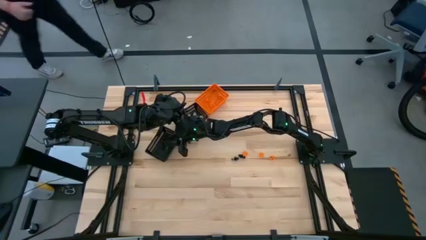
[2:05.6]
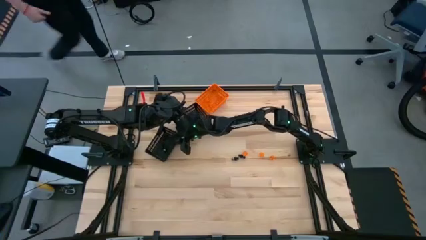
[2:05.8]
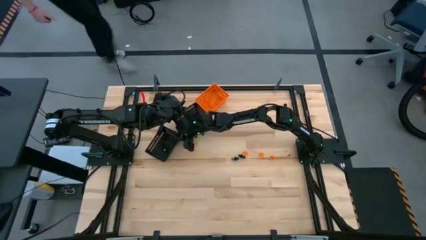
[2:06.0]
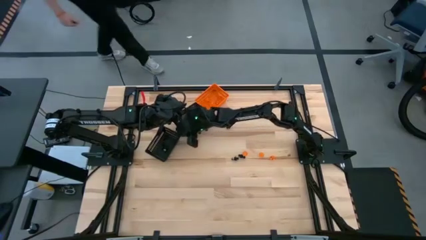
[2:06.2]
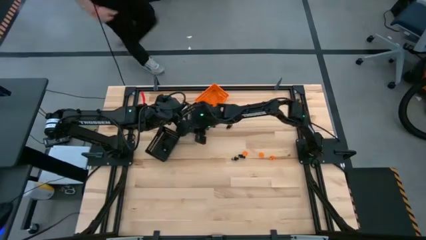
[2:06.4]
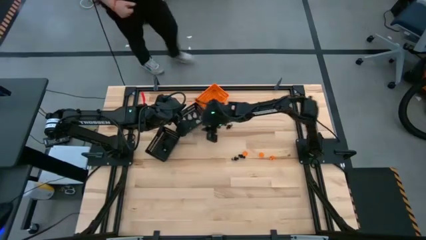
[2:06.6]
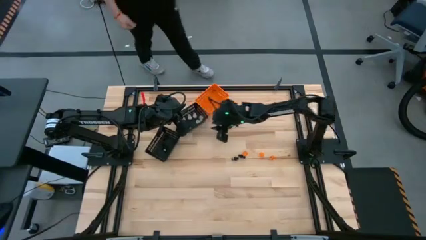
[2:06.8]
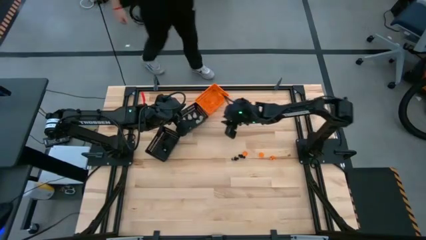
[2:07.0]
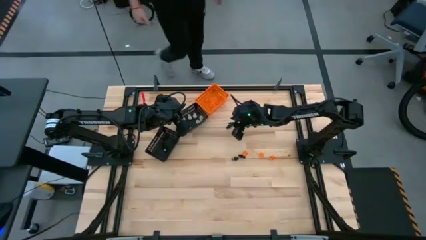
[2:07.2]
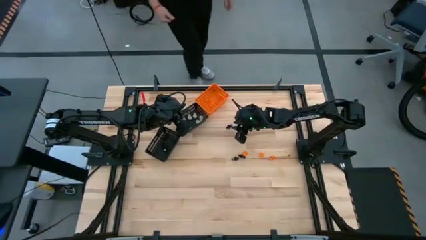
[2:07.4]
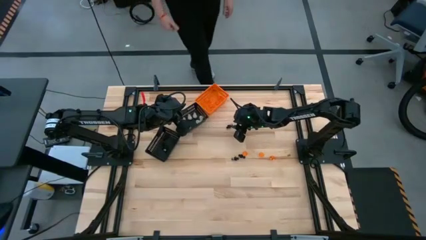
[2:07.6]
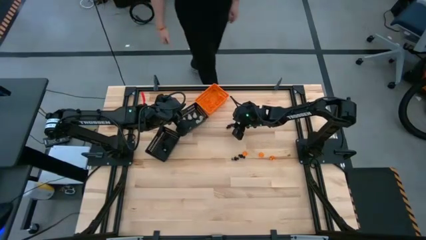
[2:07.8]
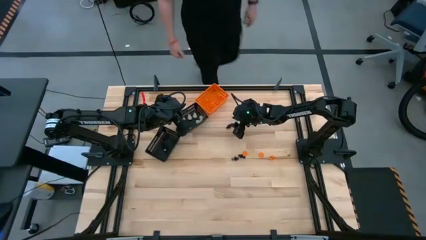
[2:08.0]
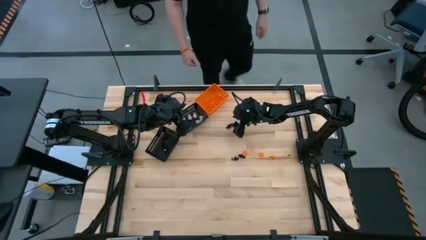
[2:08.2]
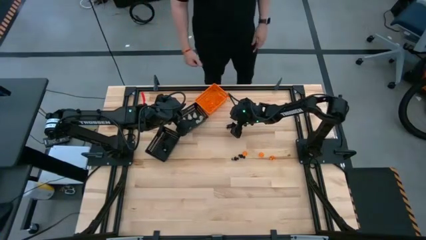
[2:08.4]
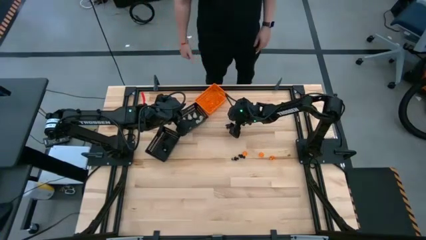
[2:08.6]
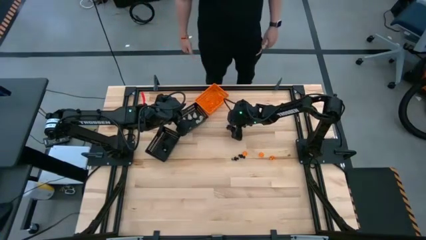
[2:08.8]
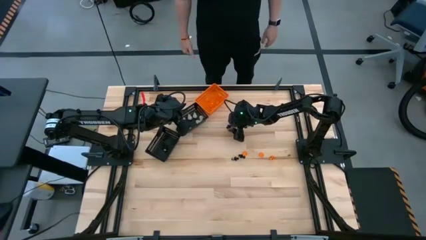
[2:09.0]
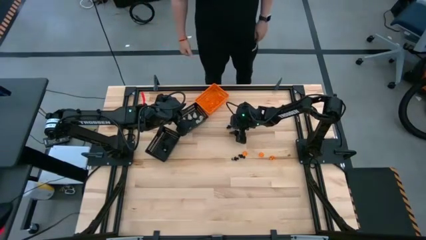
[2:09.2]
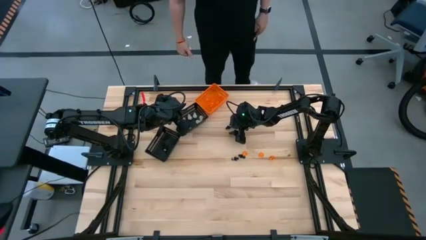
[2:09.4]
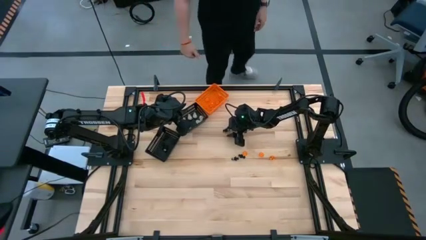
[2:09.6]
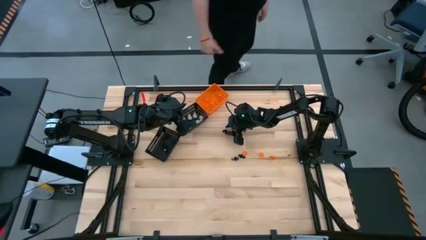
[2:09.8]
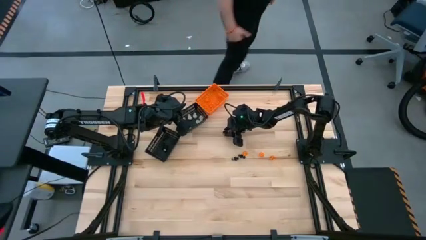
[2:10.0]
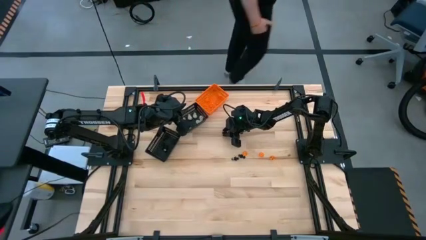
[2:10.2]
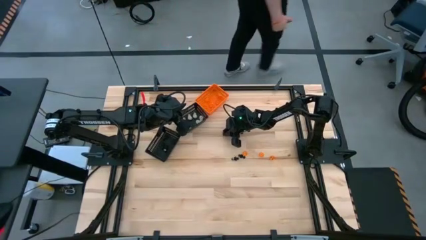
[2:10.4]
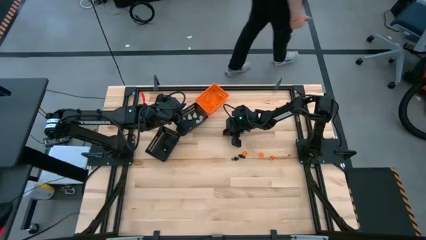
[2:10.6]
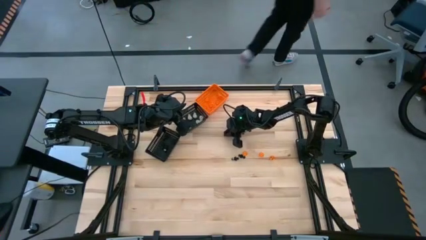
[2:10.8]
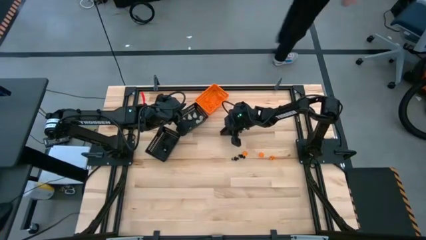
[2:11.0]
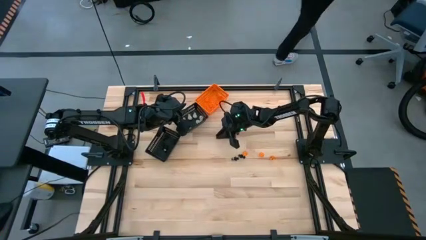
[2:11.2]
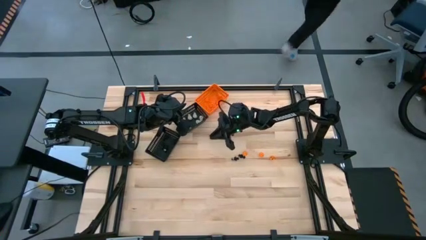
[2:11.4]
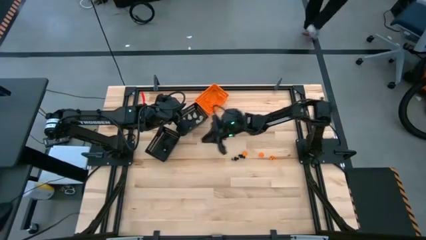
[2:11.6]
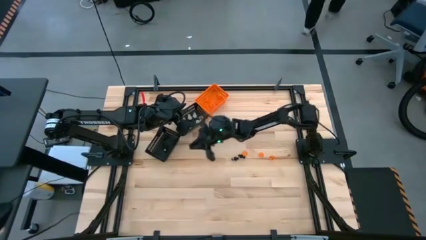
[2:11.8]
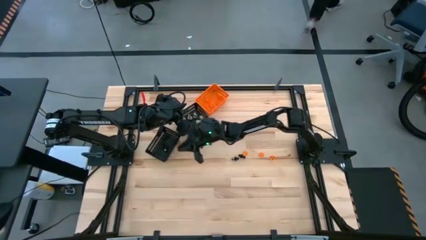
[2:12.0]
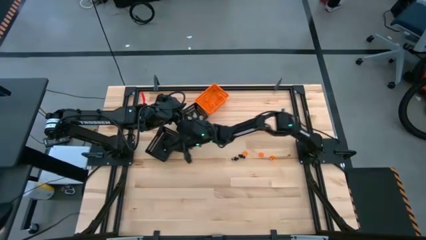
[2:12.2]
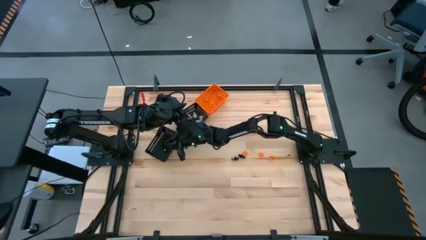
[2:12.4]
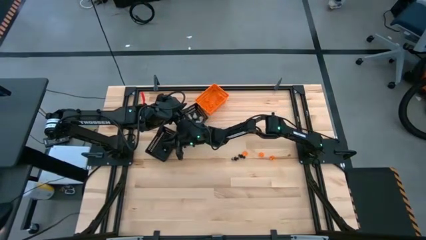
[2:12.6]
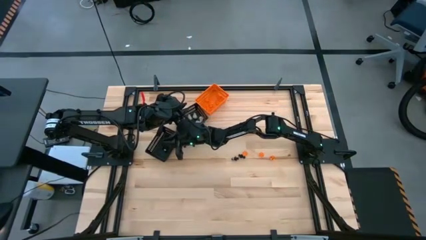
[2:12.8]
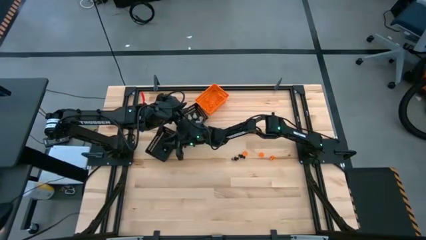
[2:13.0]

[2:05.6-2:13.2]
Task: Sort Halloween decoration
Put the black voodoo toy into the bottom black bin

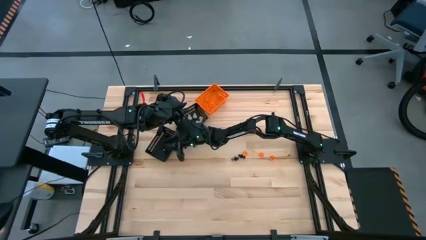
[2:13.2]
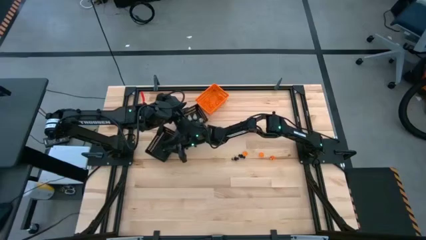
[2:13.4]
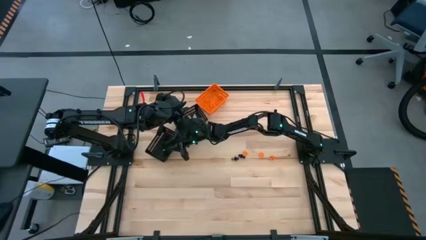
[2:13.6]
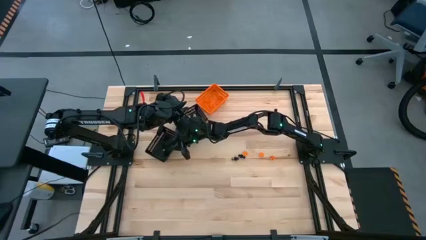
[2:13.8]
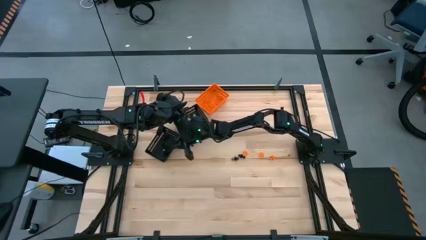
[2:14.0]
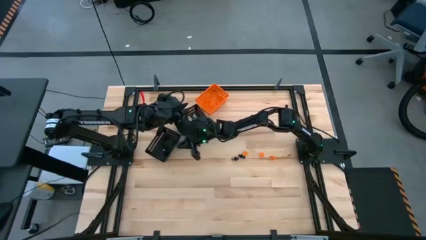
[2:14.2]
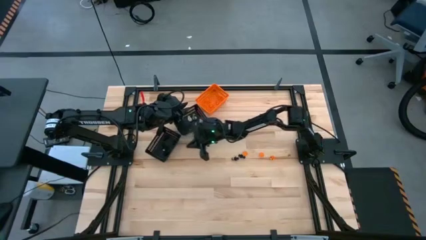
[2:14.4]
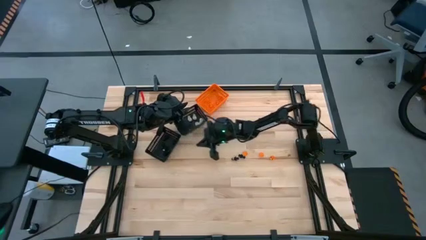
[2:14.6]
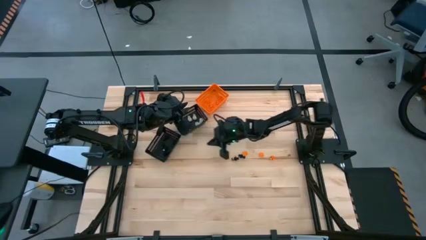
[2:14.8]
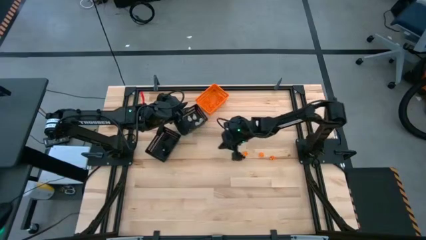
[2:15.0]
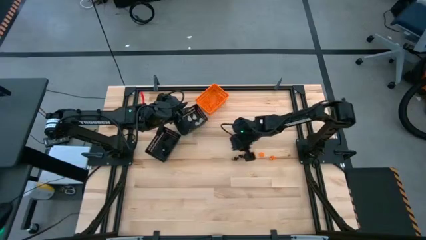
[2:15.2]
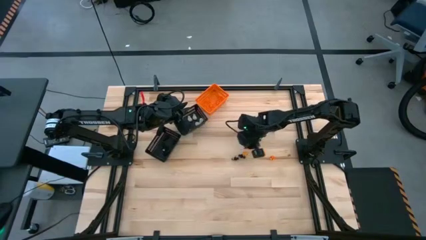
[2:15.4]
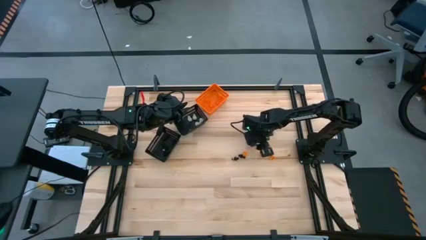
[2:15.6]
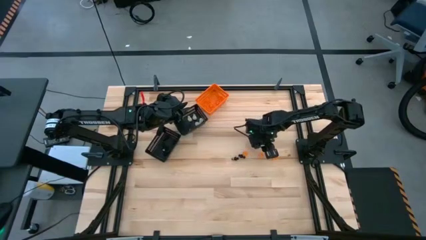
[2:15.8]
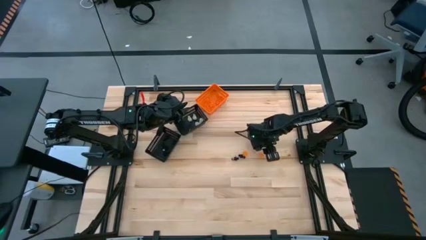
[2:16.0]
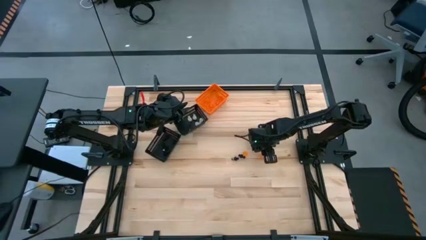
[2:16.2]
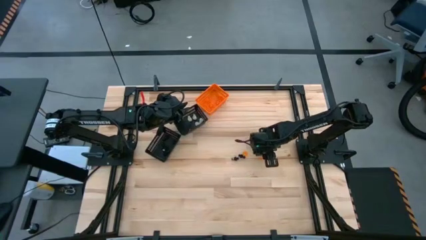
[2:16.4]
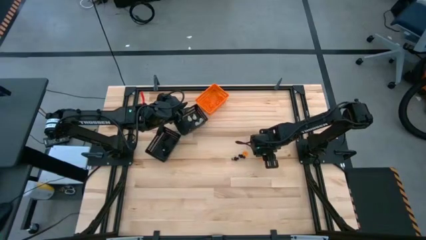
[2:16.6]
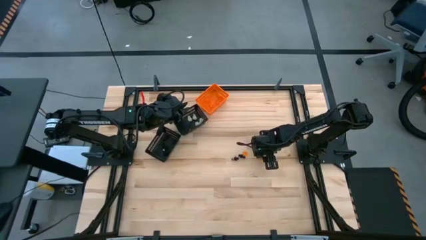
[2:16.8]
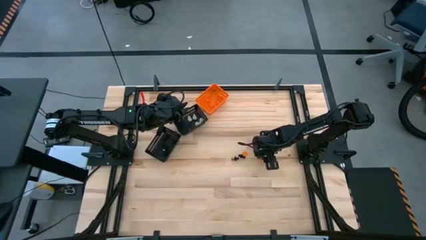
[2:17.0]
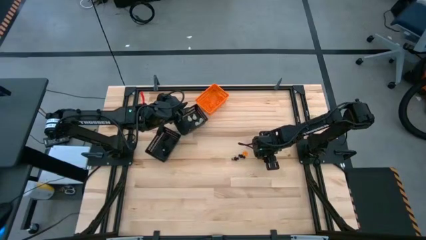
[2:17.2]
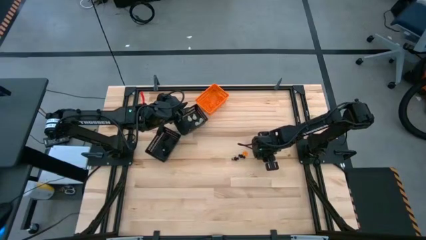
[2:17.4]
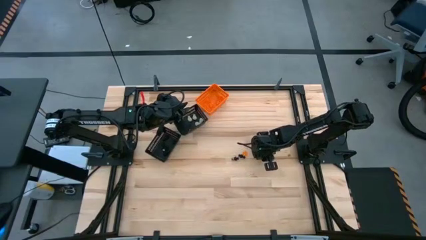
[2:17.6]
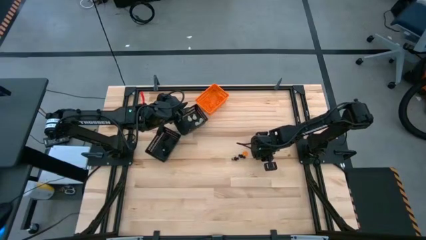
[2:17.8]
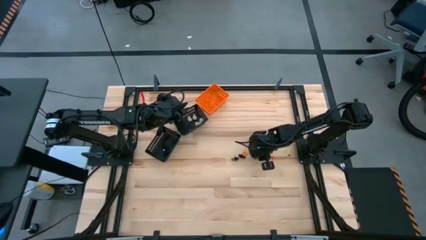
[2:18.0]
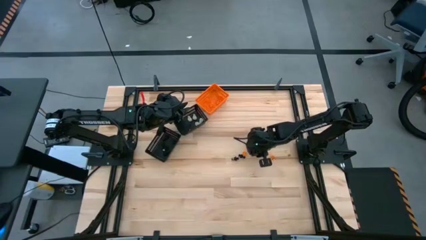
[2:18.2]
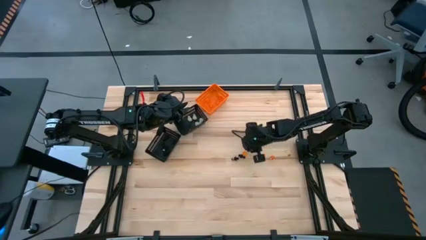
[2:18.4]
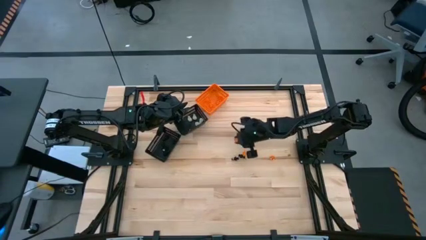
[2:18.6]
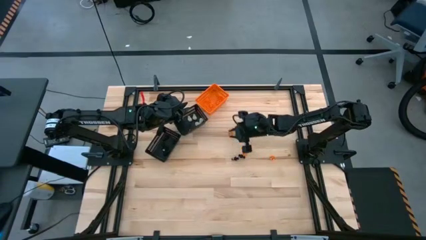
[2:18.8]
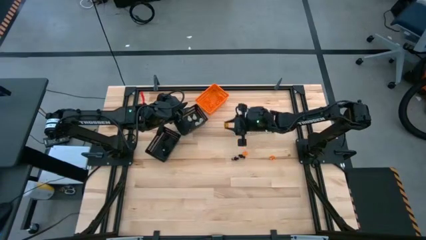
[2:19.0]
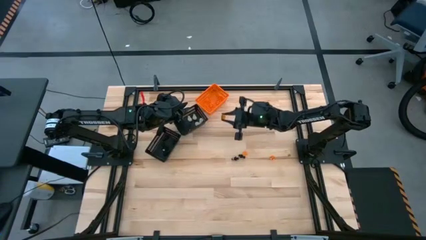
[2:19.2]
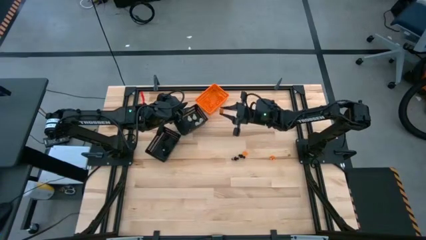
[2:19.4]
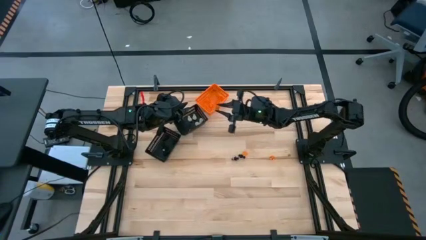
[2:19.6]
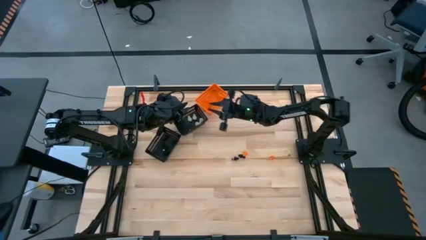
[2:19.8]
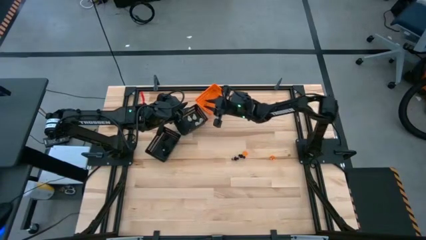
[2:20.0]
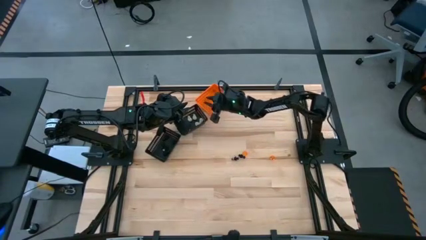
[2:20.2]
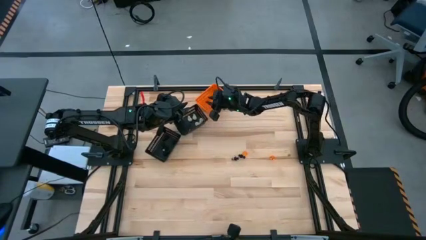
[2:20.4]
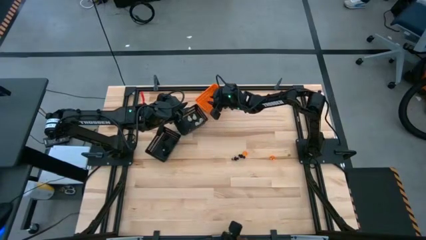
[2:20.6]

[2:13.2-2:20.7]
Put the orange pumpkin toy into the orange bin
